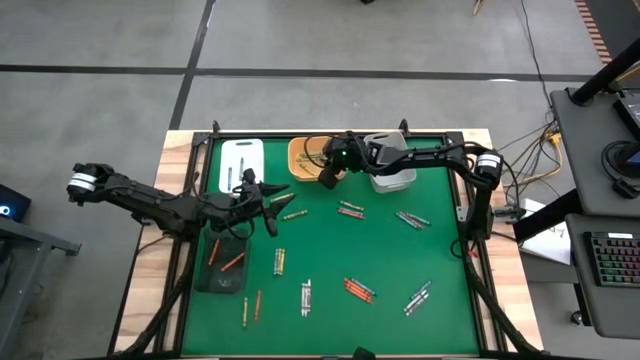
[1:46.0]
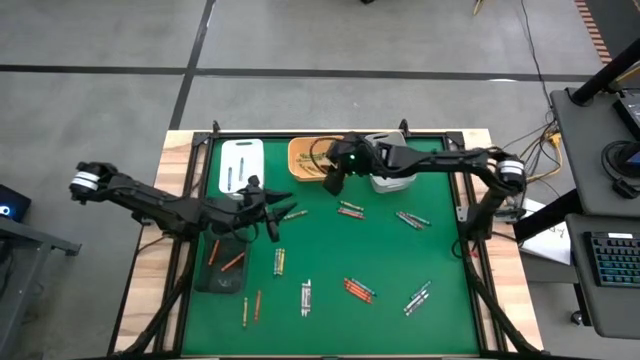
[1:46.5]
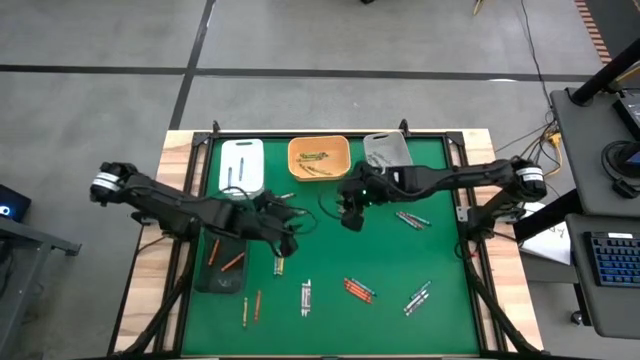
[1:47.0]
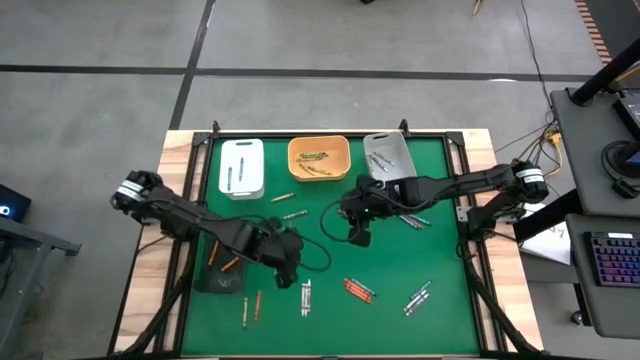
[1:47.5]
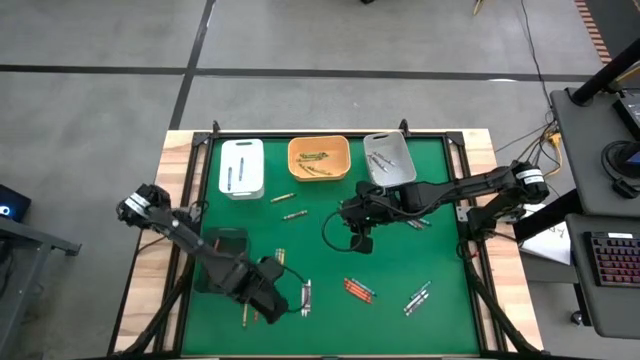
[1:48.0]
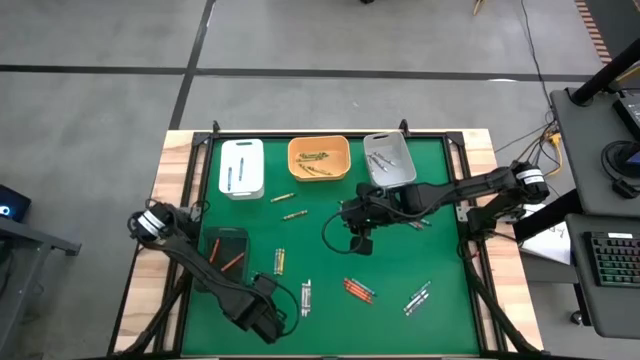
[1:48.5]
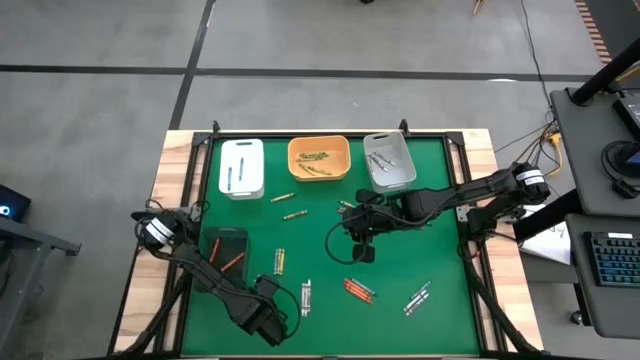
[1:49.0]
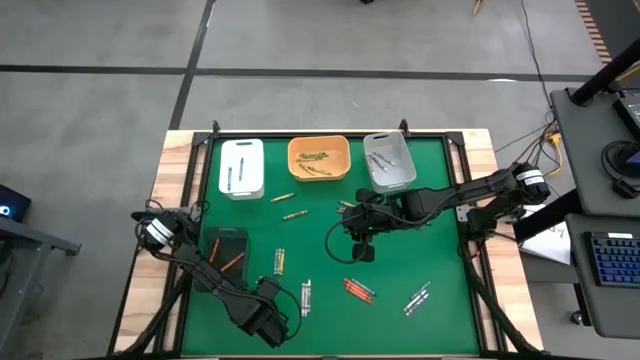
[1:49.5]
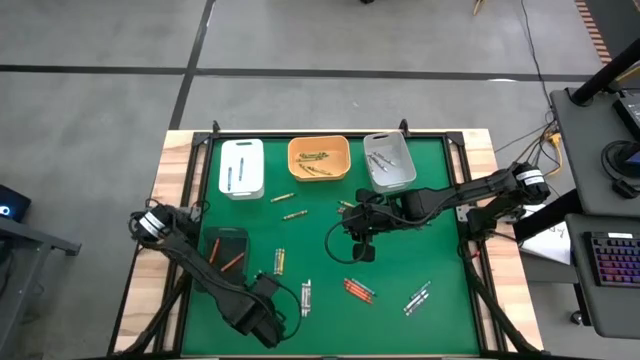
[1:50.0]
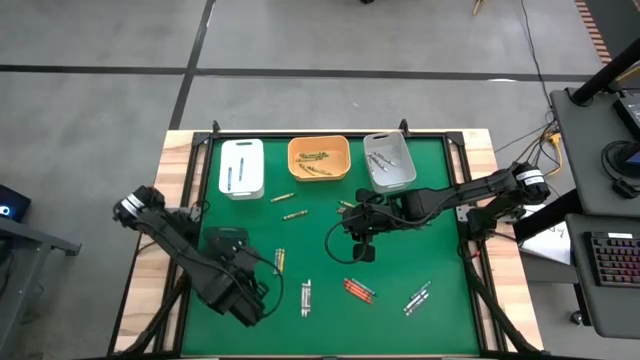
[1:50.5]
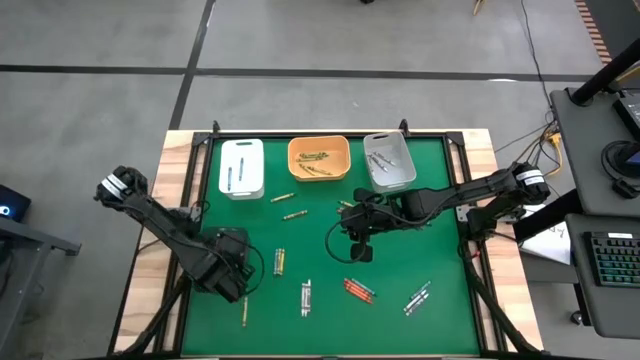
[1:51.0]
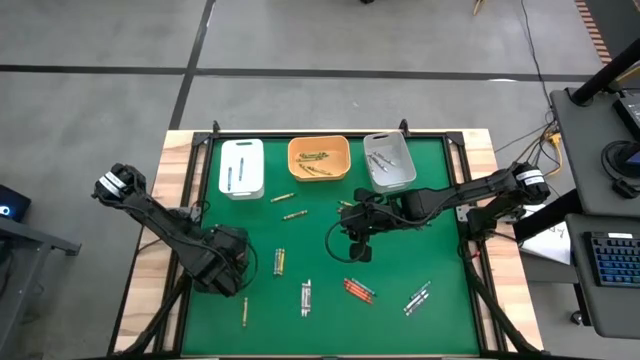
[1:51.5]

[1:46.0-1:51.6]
Task: Sort crayons
Put the orange crayon into the black bin

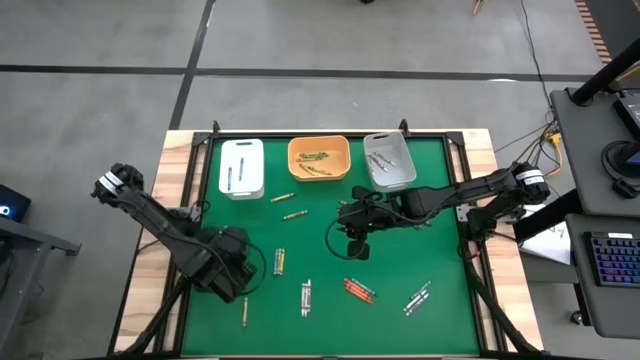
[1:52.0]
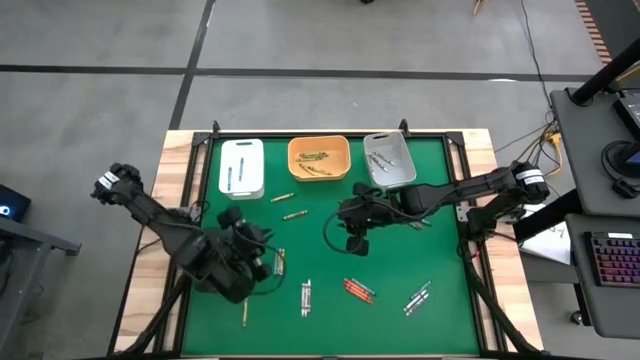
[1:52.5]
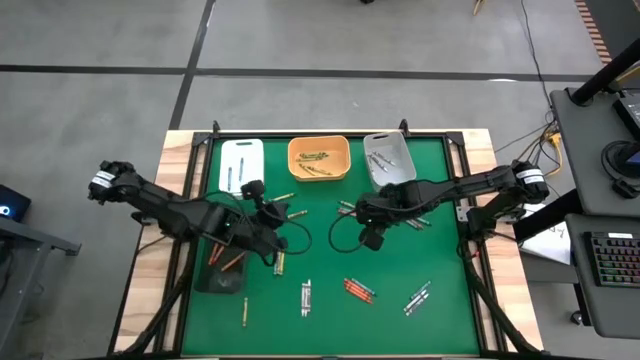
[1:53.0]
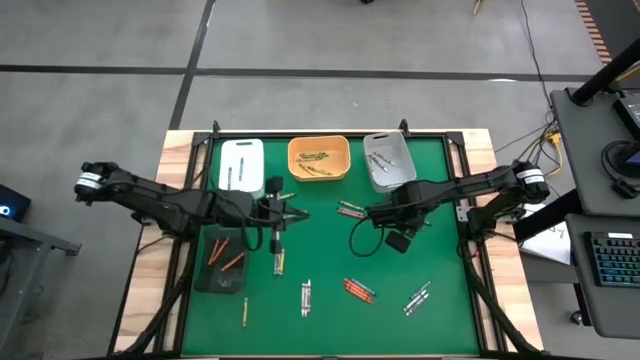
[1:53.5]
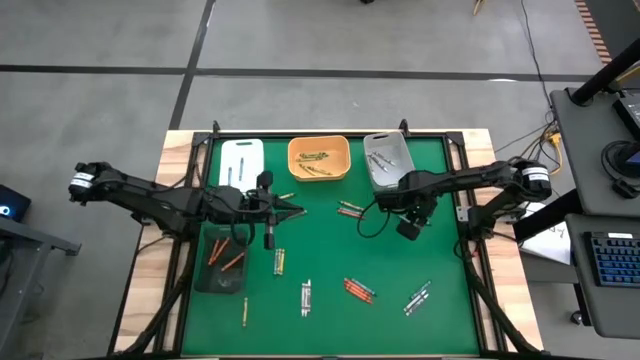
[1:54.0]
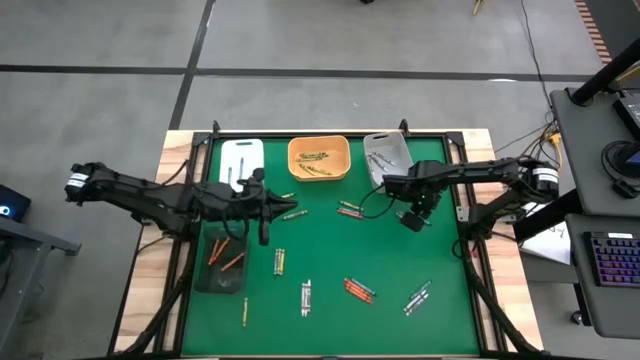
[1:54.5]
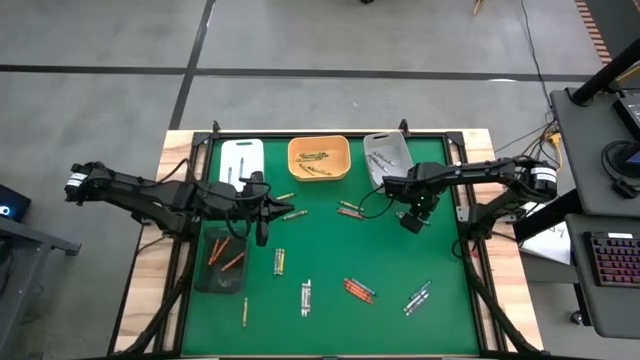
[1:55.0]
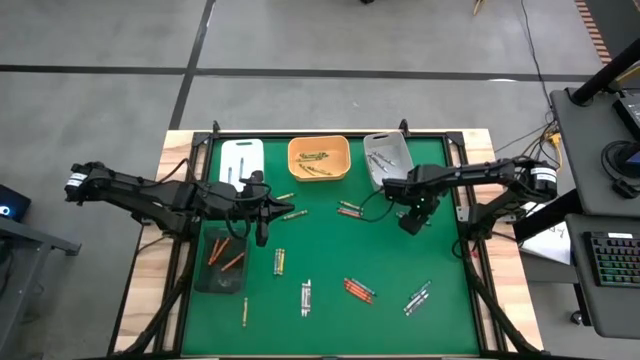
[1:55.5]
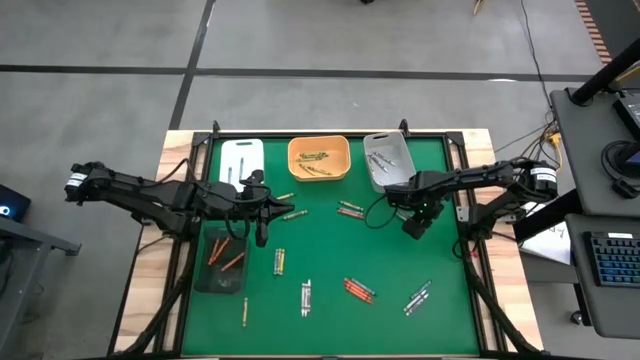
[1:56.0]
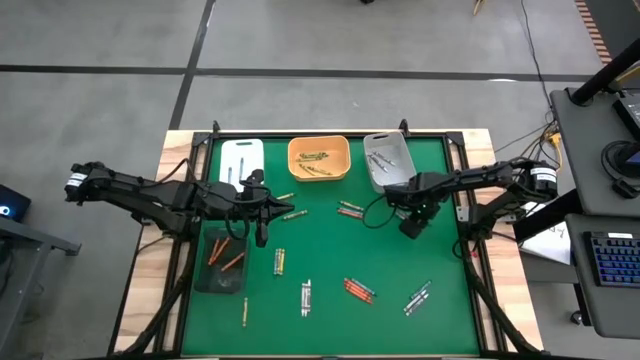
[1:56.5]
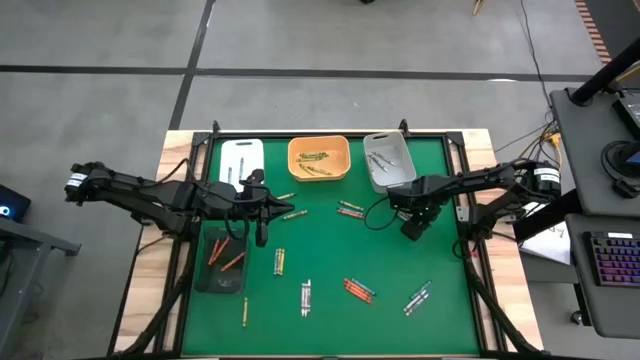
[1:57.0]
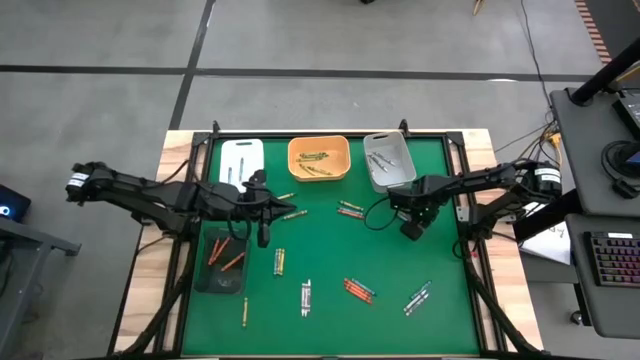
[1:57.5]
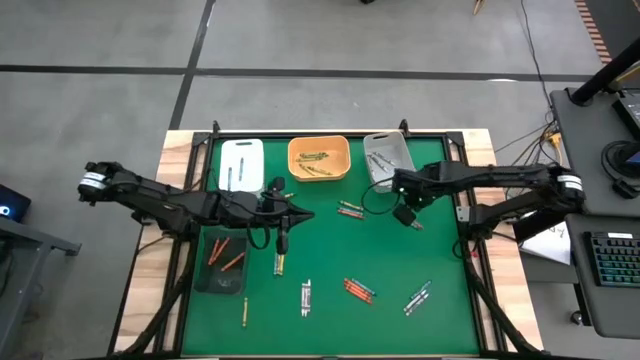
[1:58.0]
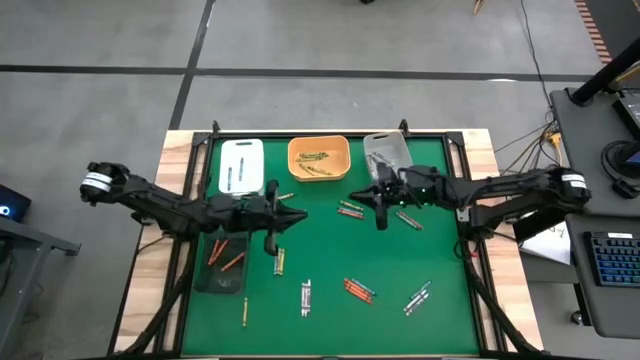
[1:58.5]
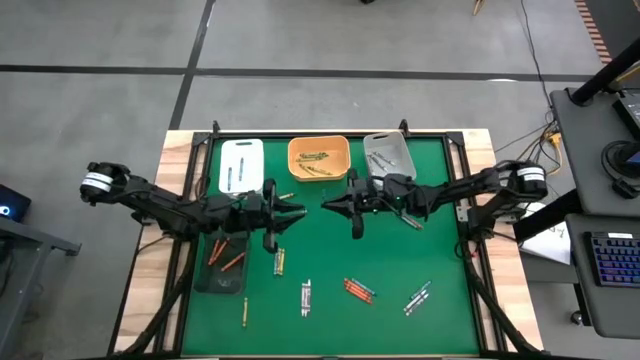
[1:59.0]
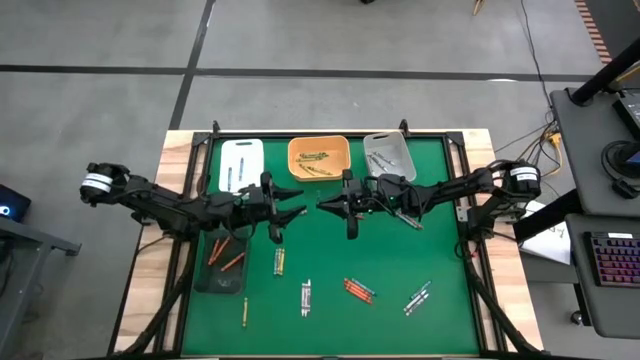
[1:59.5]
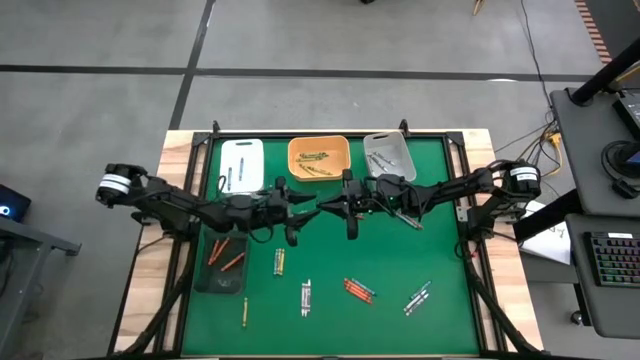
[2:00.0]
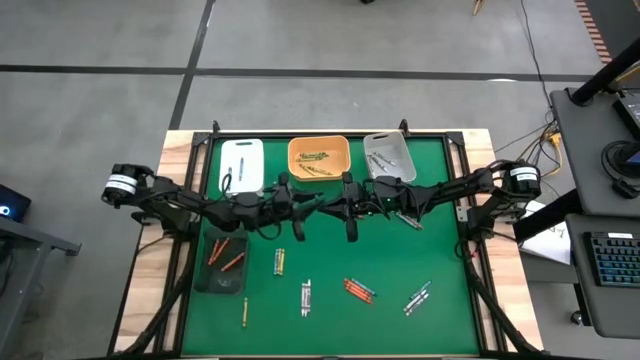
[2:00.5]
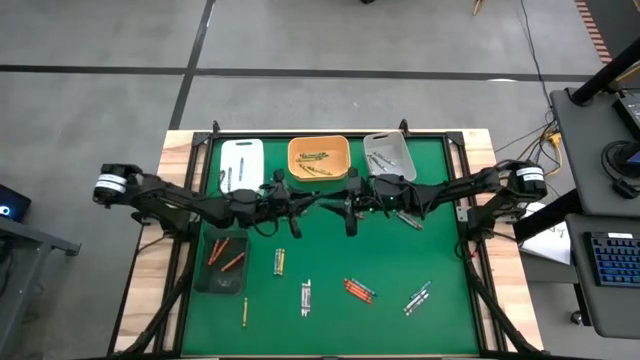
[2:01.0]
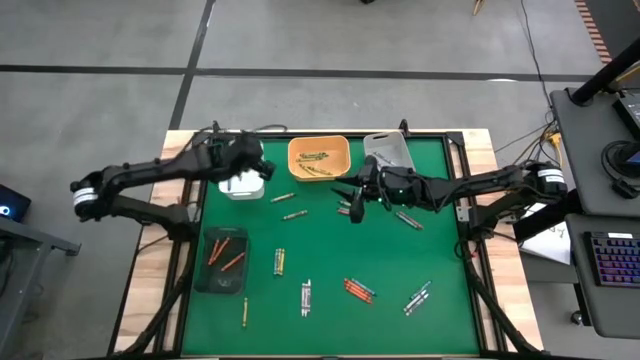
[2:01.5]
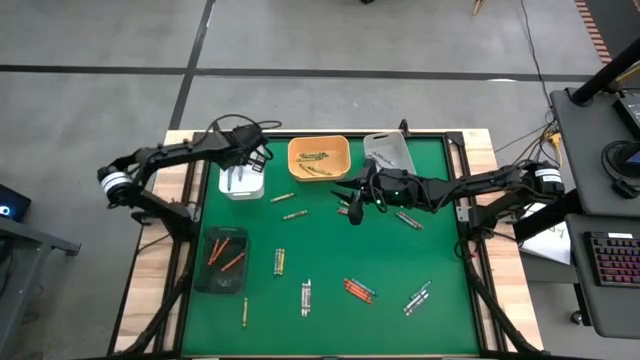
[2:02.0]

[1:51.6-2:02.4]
Put the blue crayon into the white bin

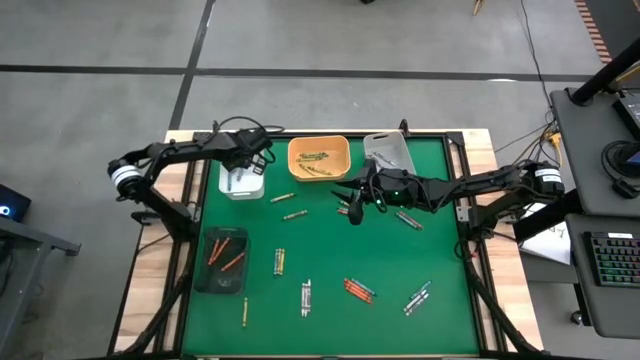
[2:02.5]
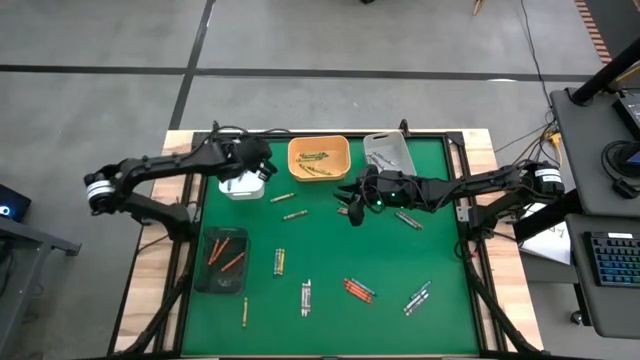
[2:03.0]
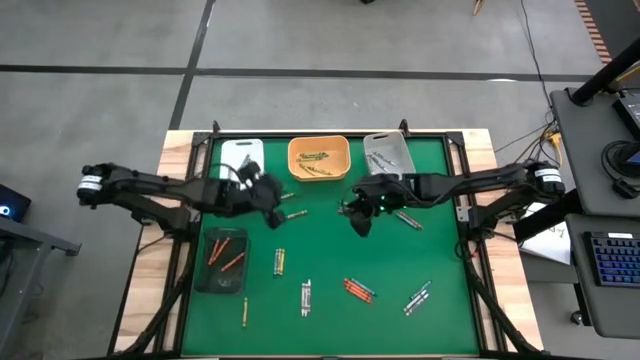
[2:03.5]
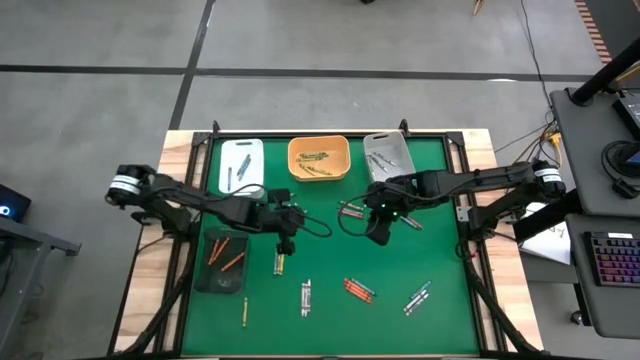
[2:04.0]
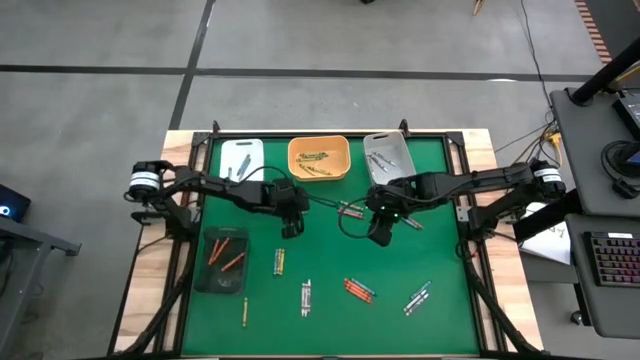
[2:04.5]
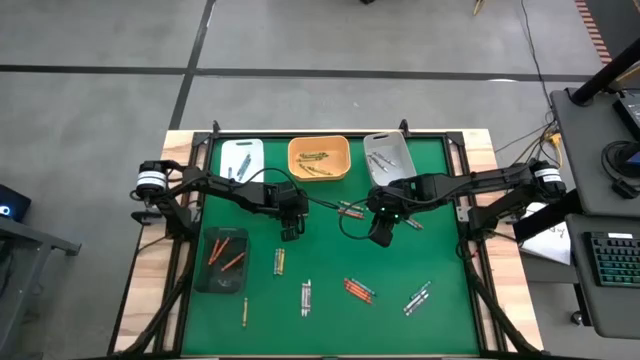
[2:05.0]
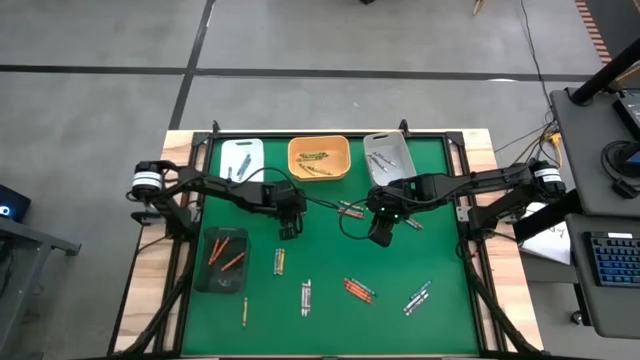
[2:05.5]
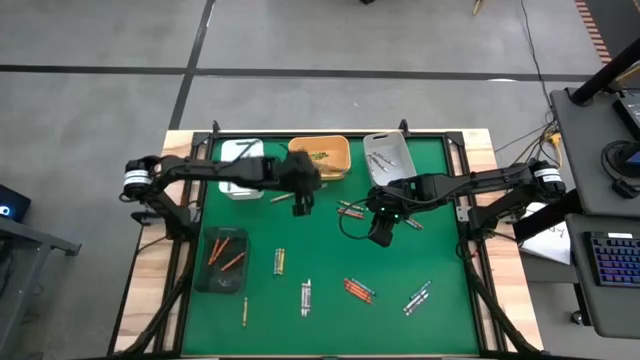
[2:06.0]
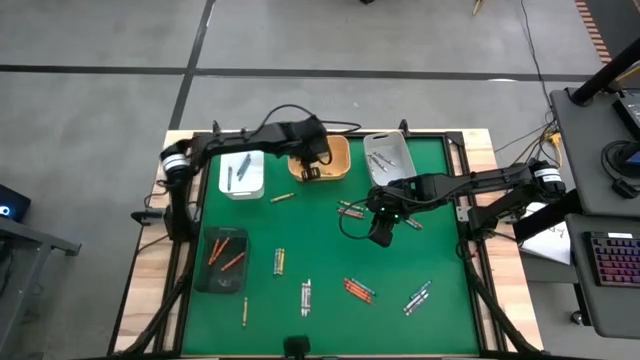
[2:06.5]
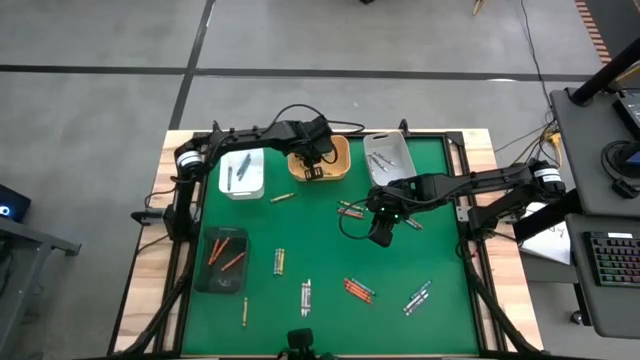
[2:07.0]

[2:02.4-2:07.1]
Put the green crayon into the yellow bin

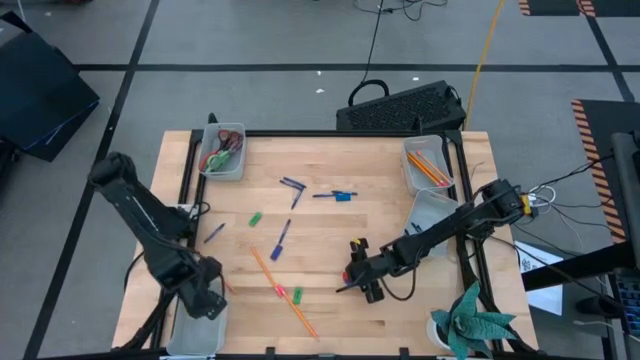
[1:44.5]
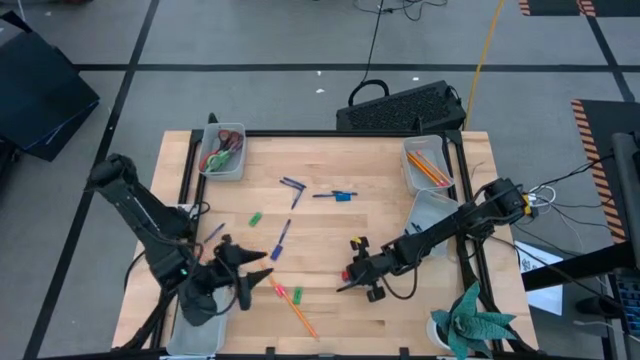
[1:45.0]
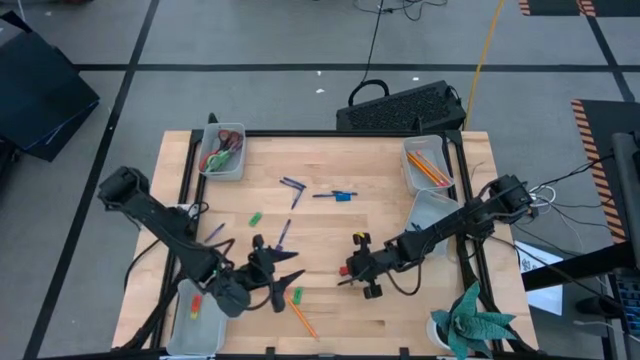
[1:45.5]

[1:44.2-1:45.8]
Task: Sort crayons/erasers/pens/pencils in bins
Put the red eraser into the bottom left gray bin
